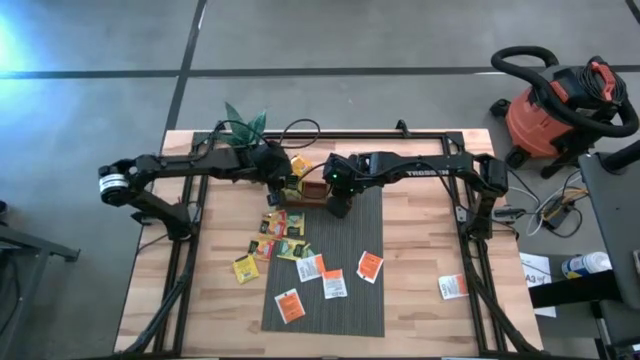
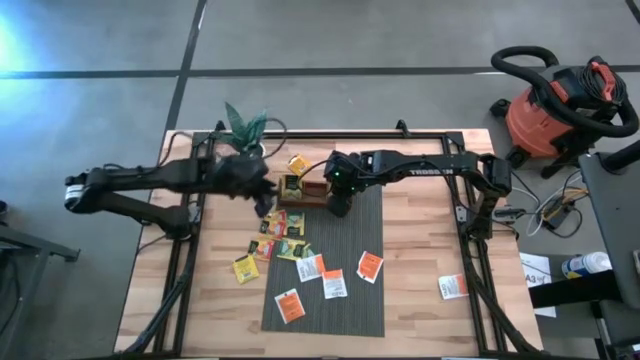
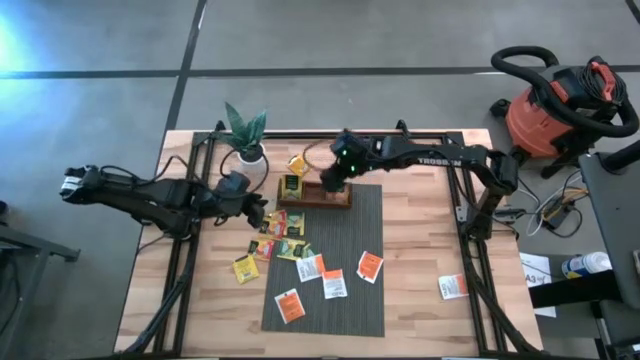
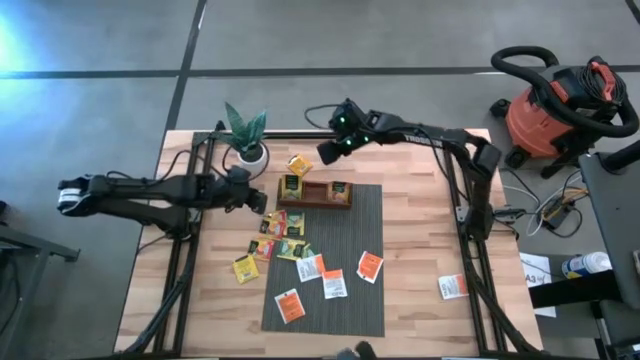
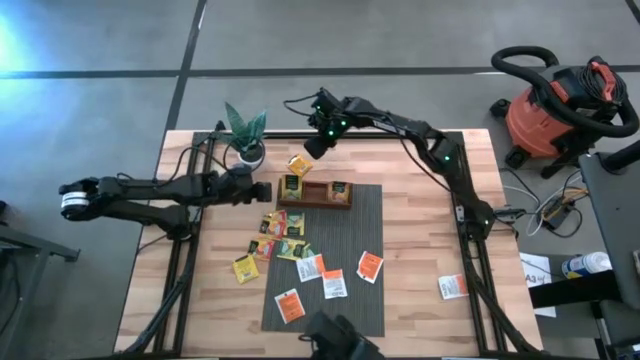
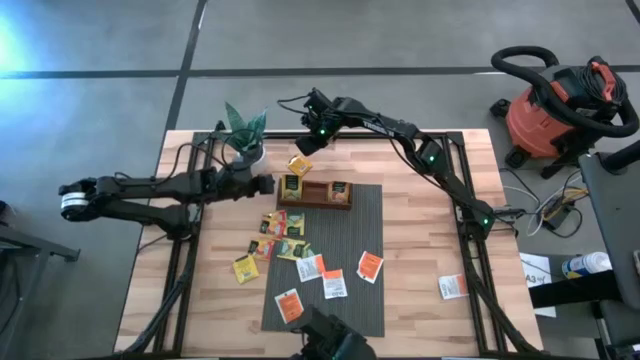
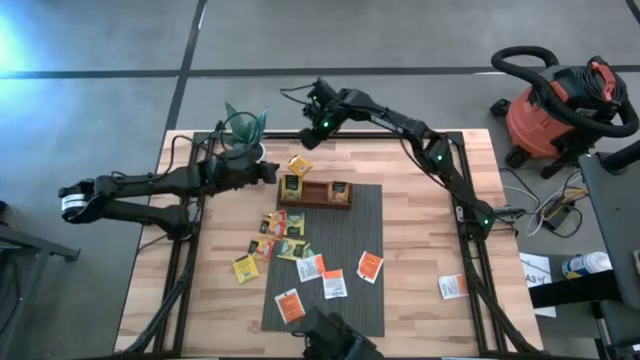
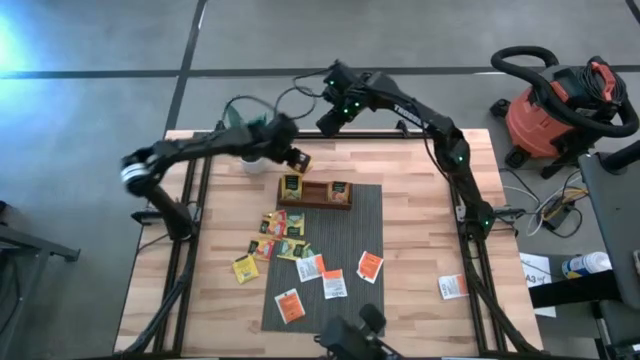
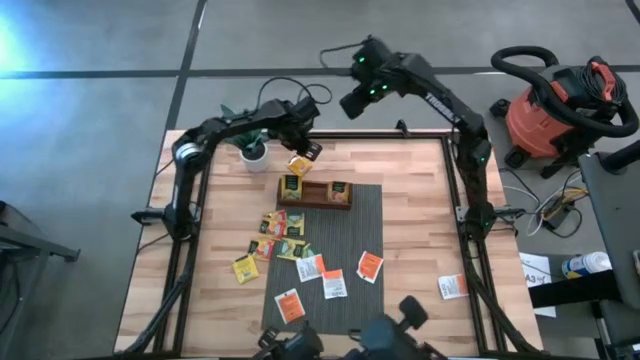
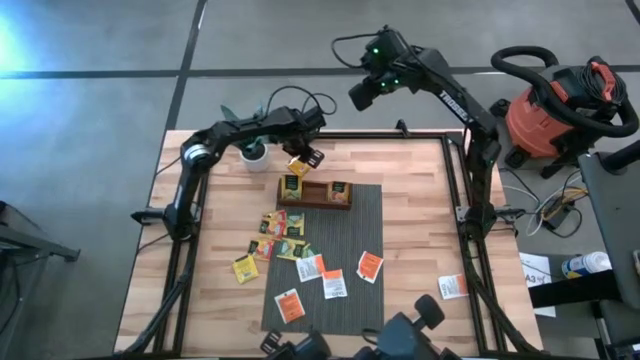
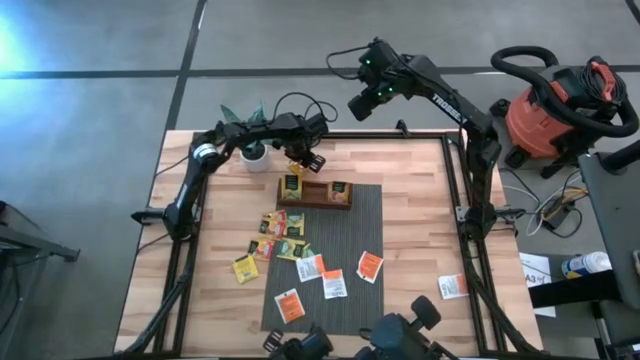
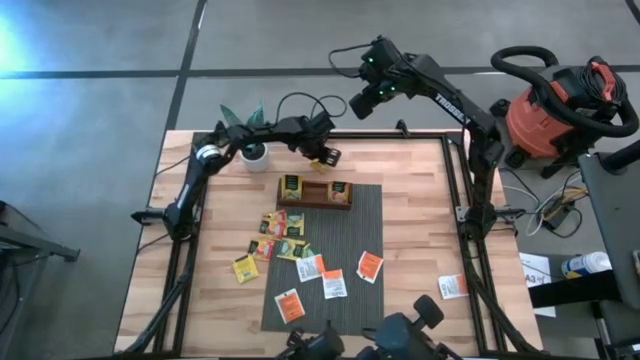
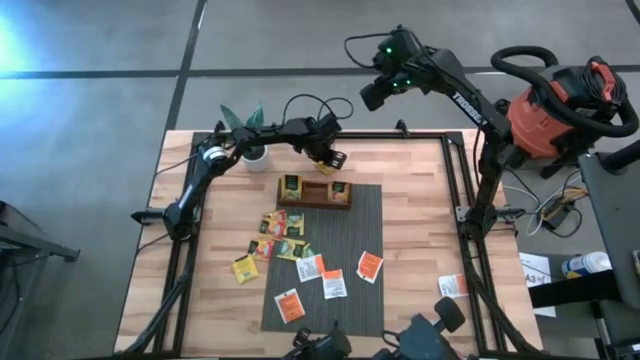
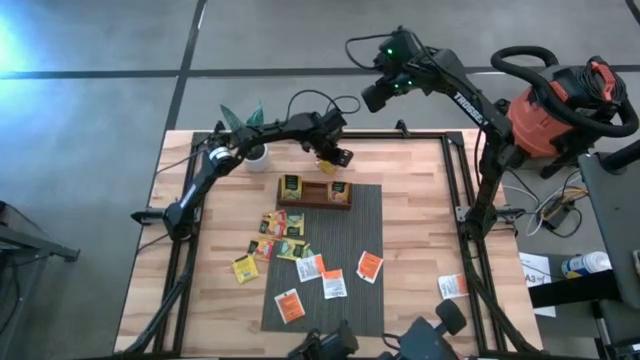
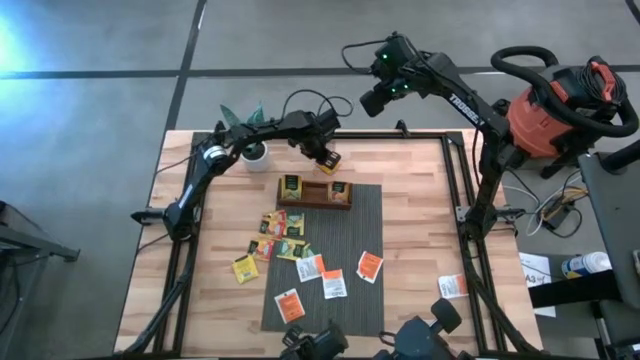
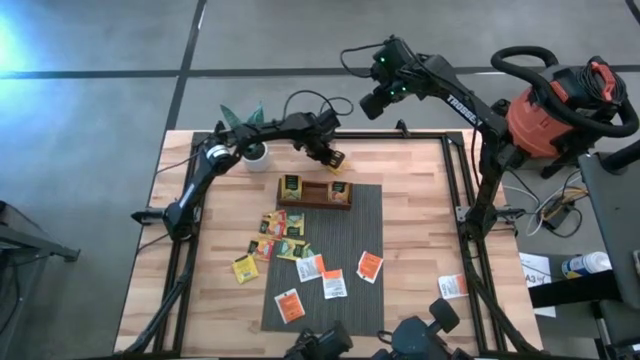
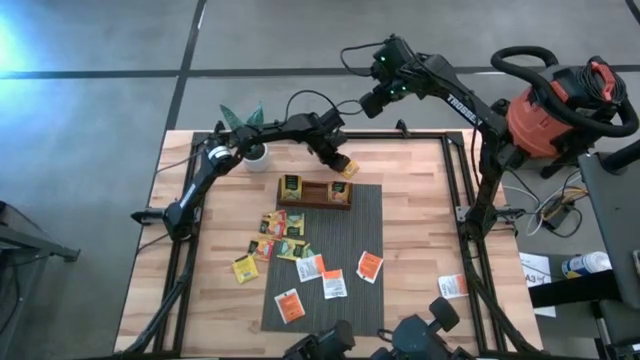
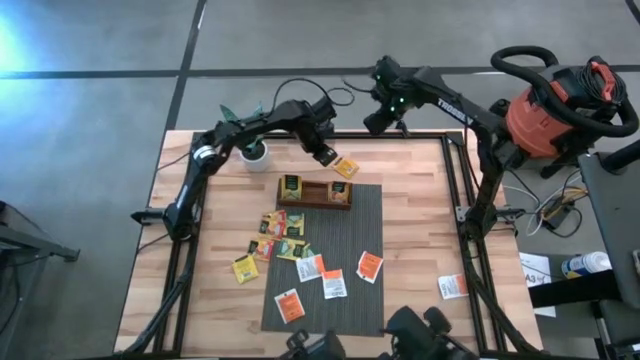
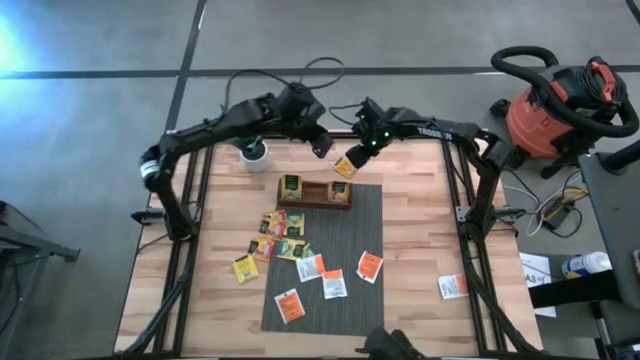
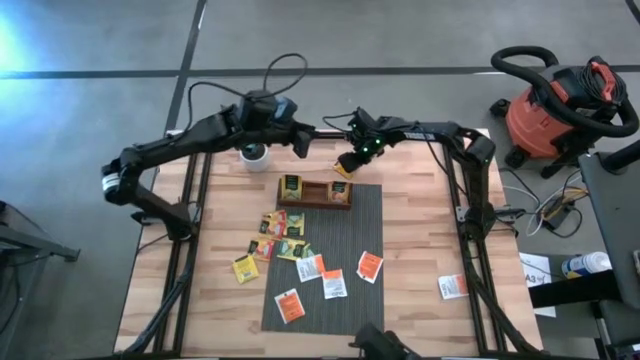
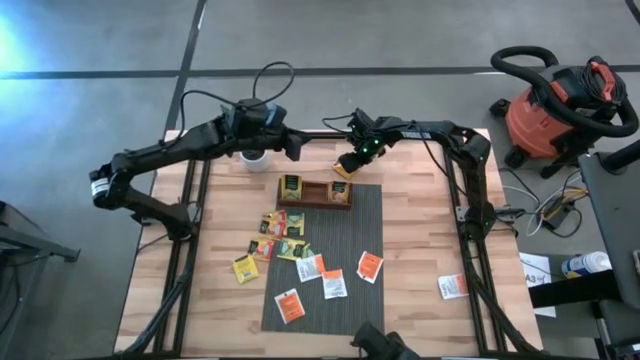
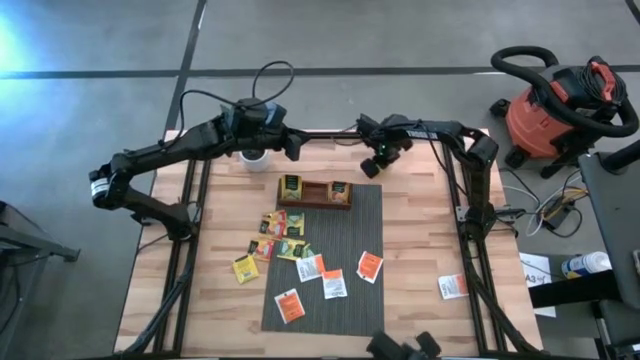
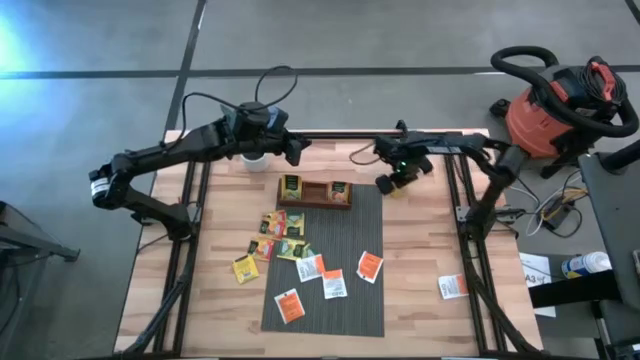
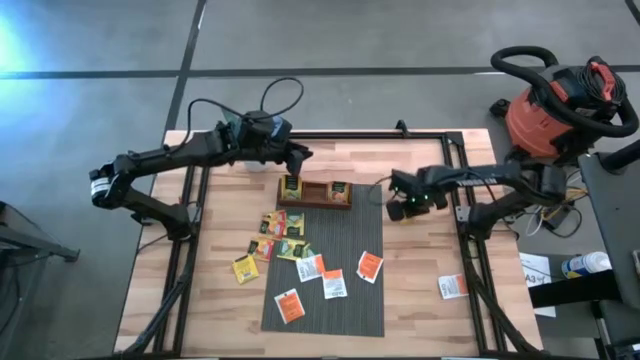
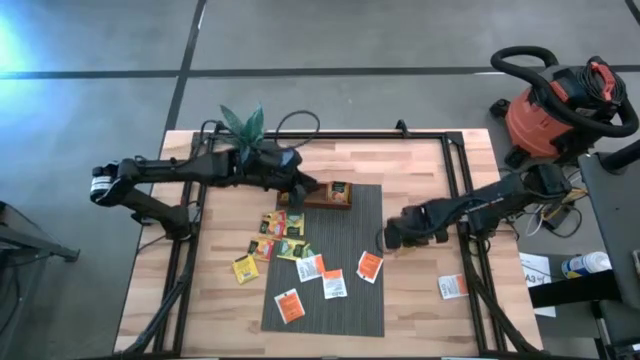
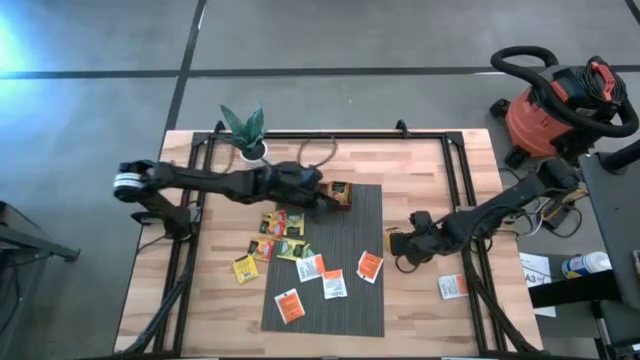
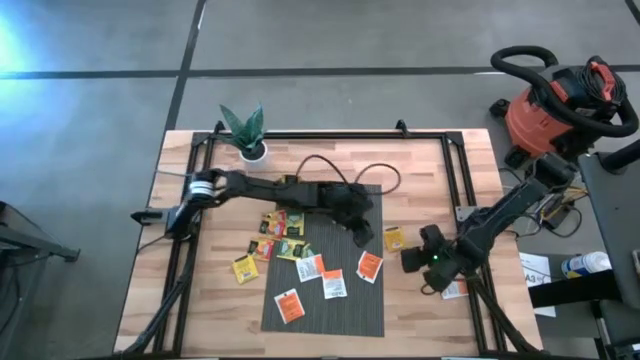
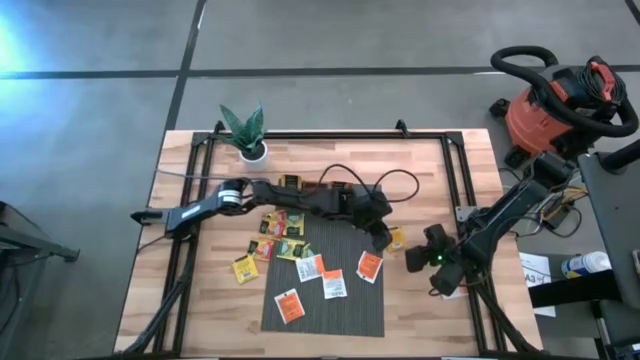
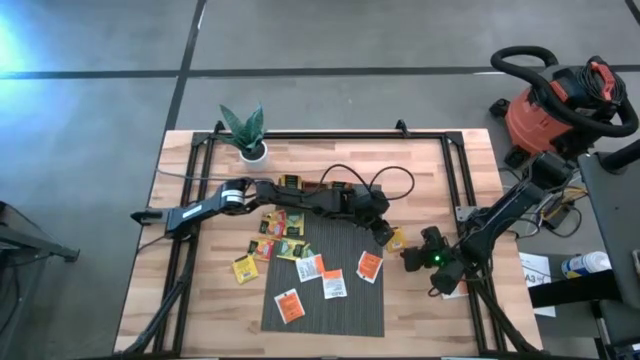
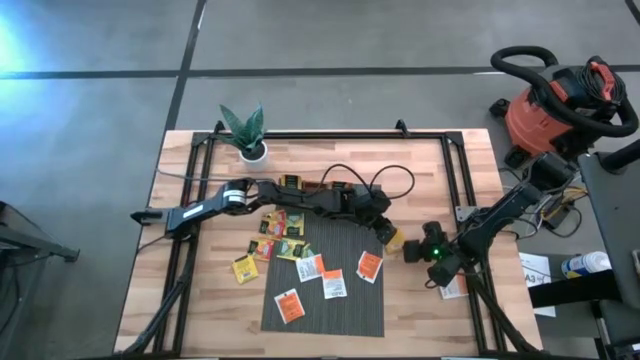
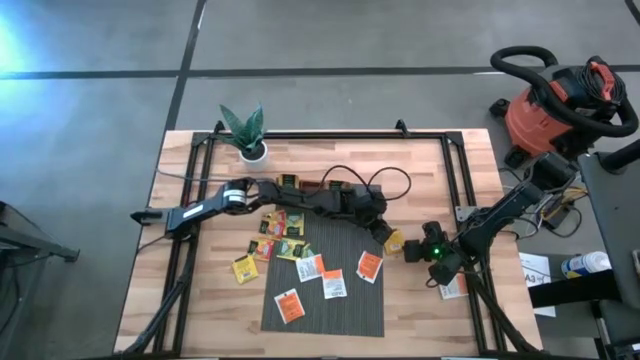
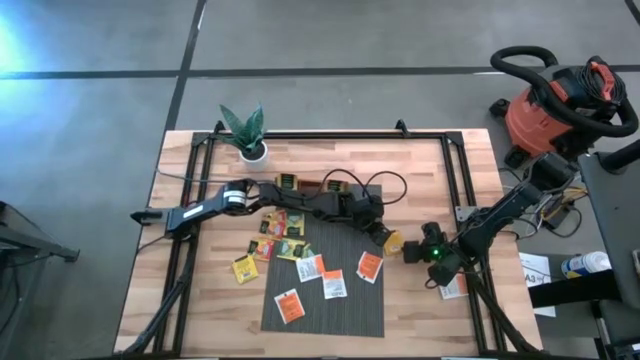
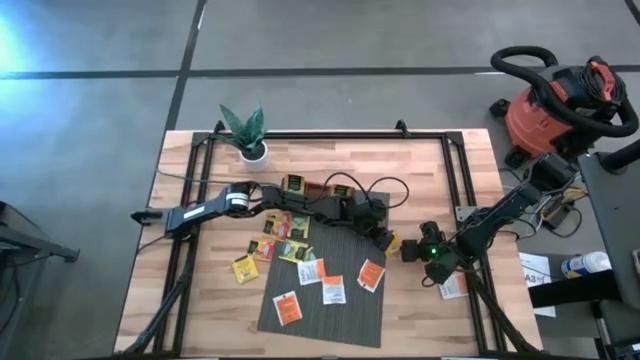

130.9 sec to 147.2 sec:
Task: Pick & Place Tea
Put the orange tea bag into the right compartment of the wooden organizer

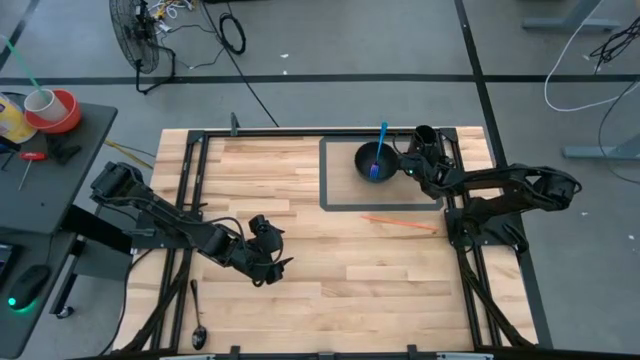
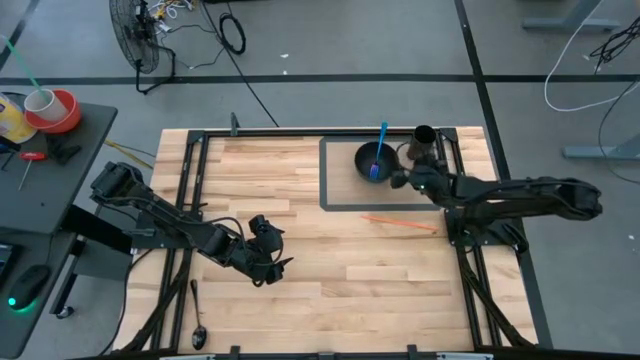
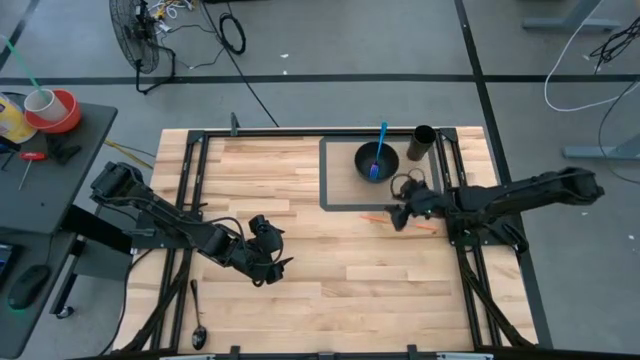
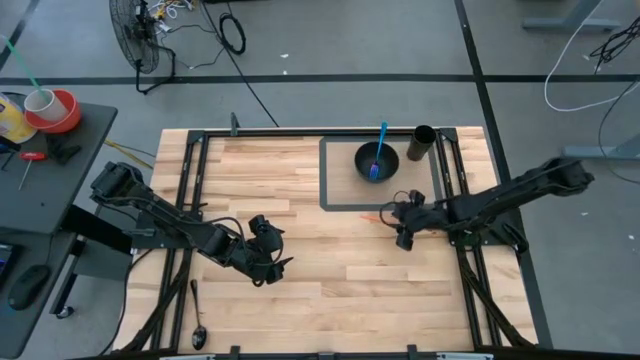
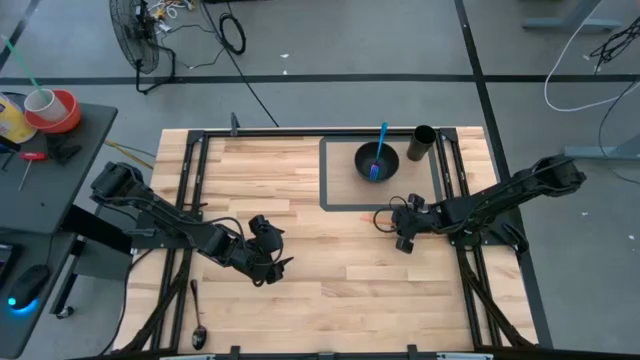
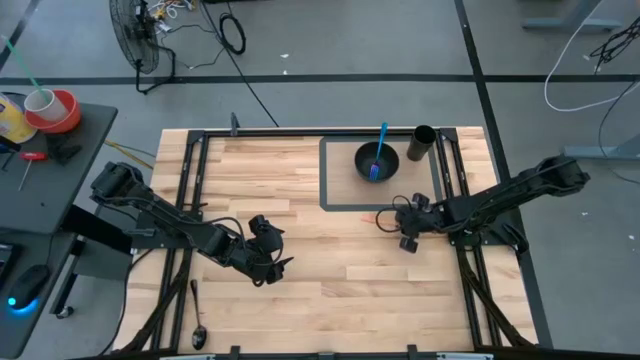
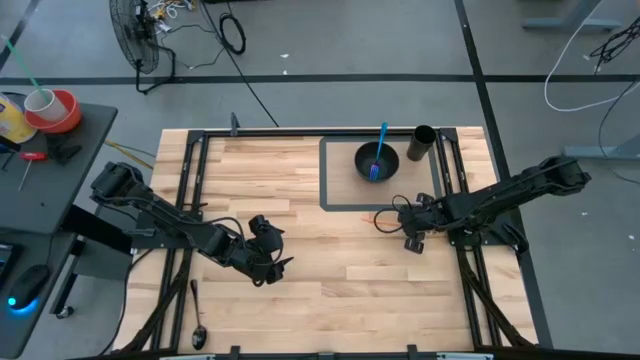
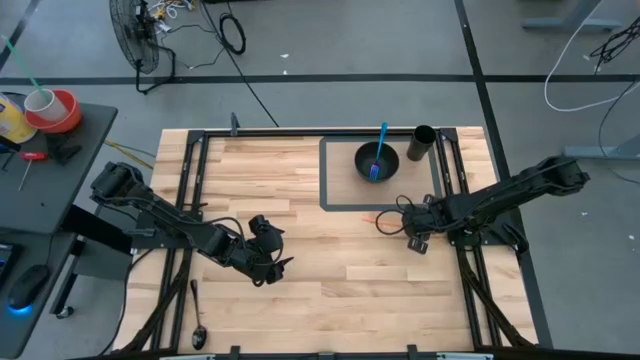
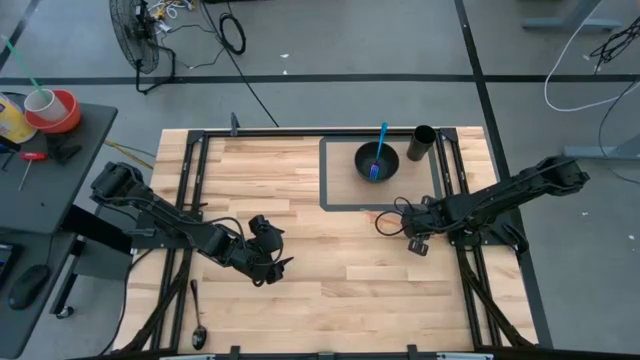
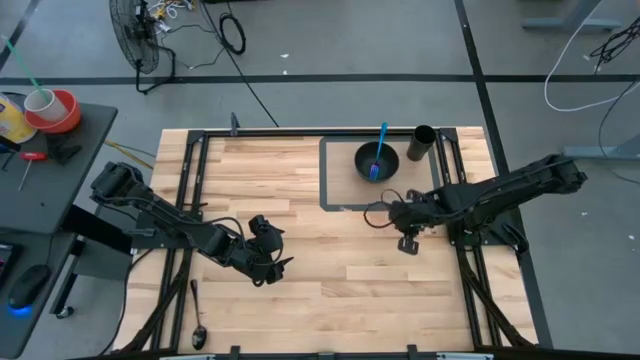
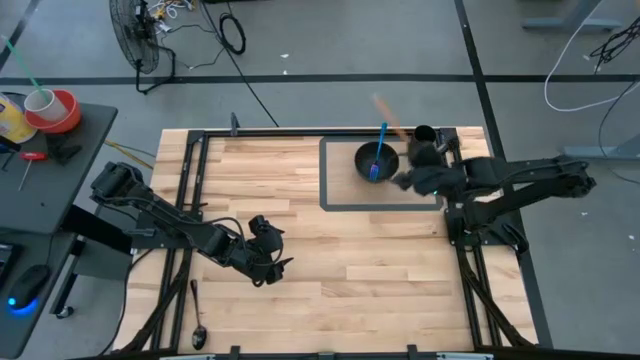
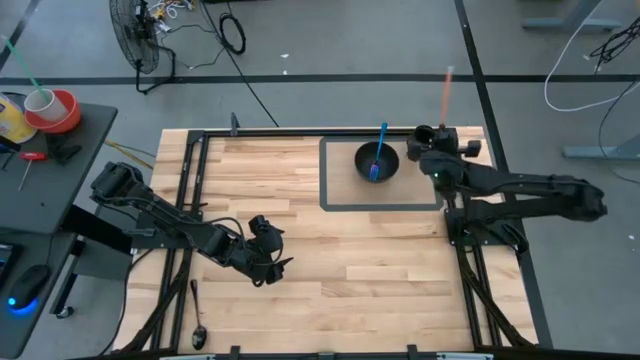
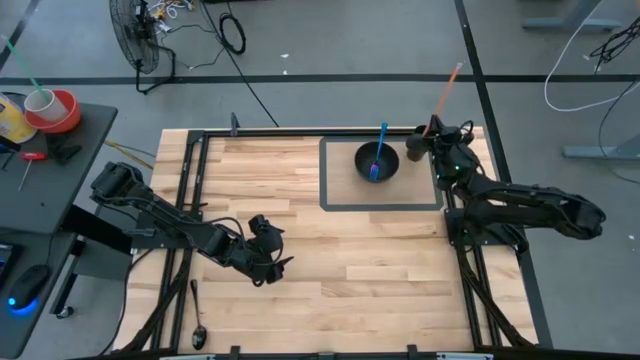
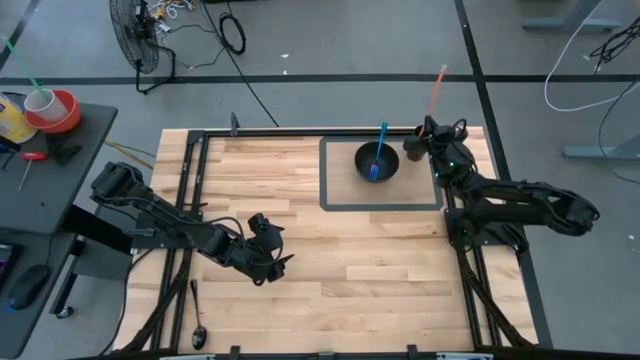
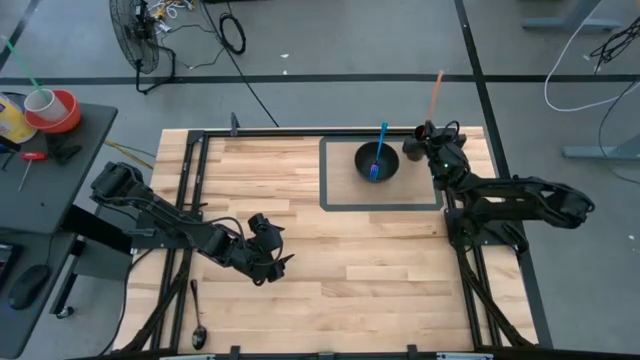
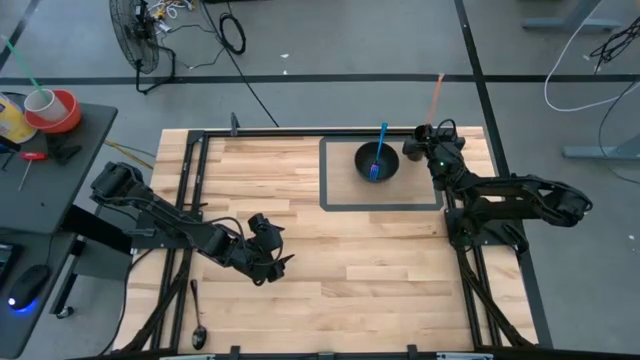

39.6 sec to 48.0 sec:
Task: Pick & Place Utensil
Put the orange straw into the black cup on the brown mat
